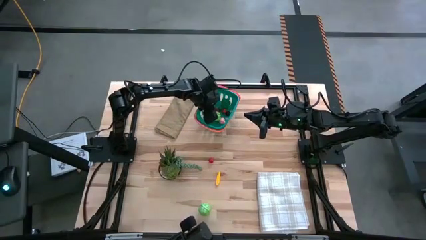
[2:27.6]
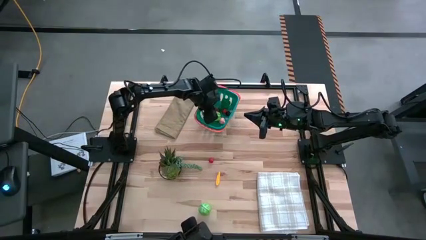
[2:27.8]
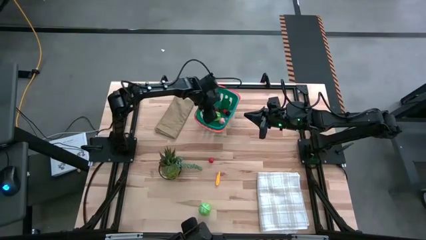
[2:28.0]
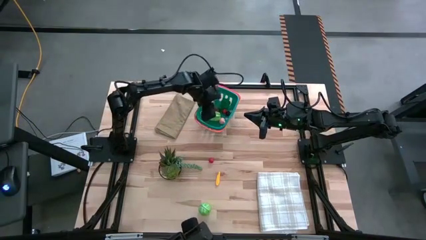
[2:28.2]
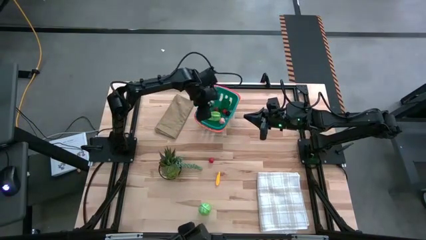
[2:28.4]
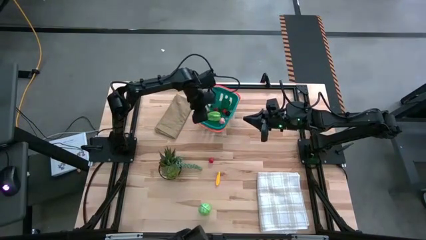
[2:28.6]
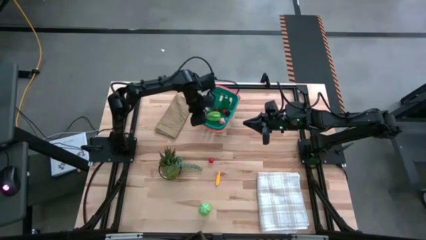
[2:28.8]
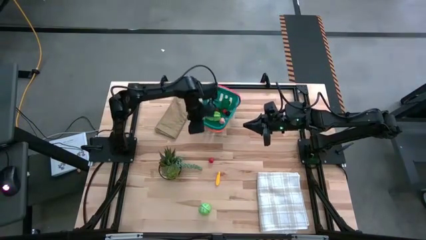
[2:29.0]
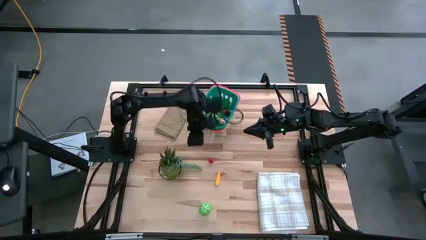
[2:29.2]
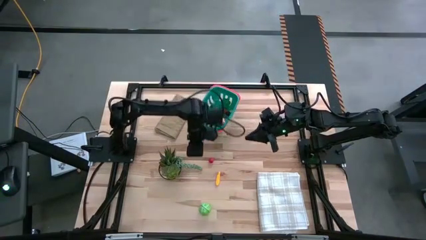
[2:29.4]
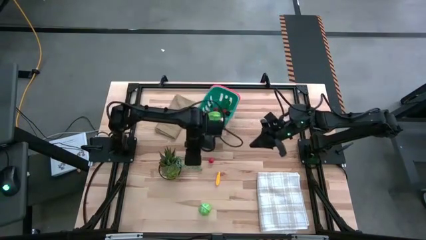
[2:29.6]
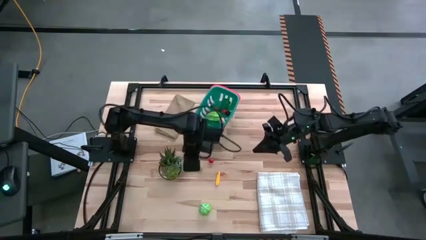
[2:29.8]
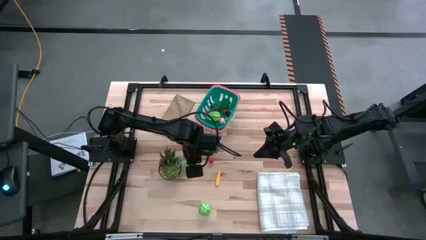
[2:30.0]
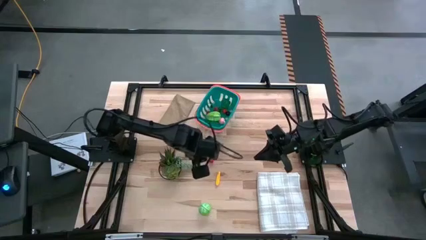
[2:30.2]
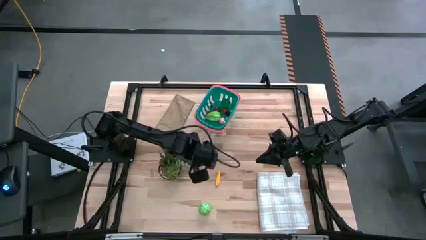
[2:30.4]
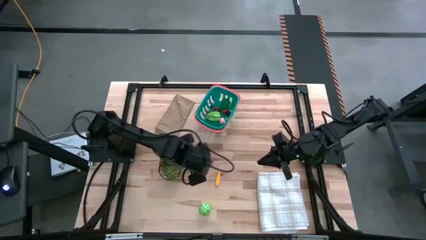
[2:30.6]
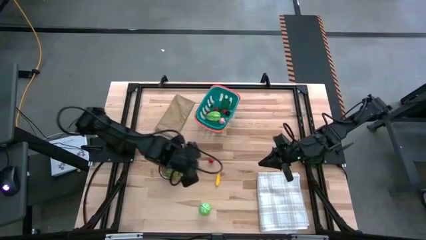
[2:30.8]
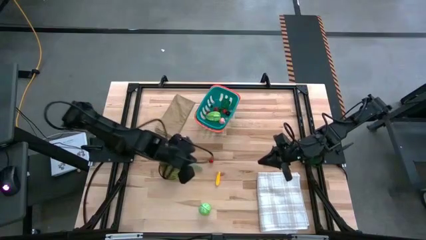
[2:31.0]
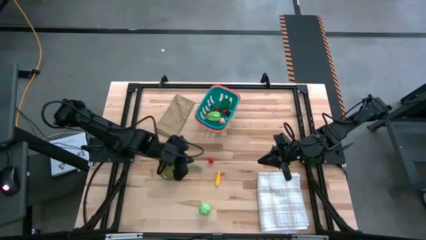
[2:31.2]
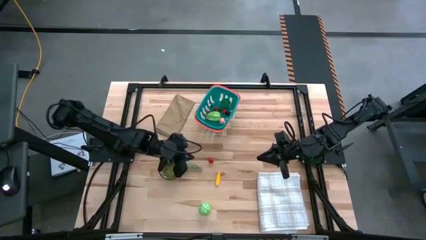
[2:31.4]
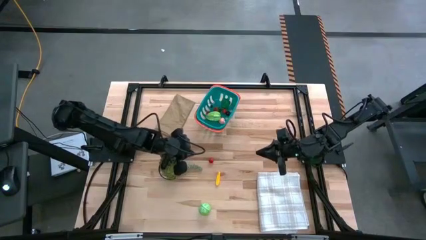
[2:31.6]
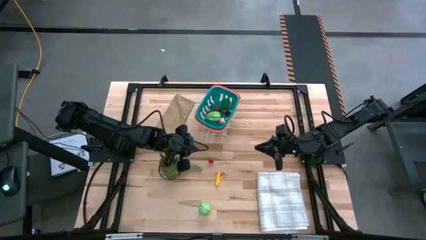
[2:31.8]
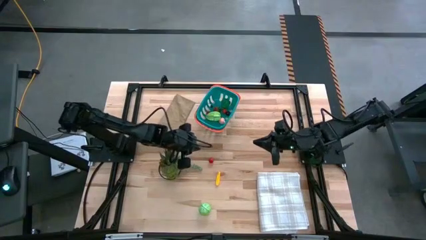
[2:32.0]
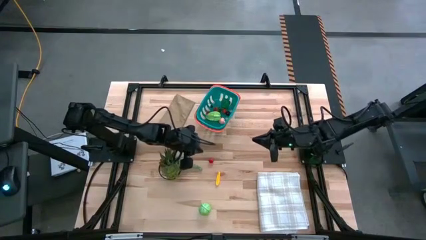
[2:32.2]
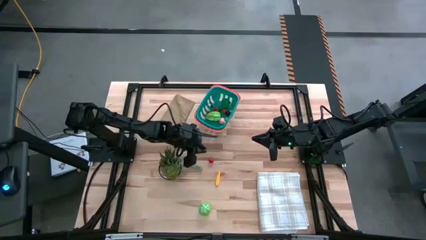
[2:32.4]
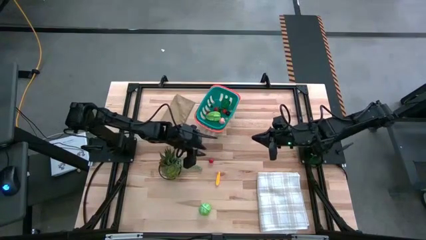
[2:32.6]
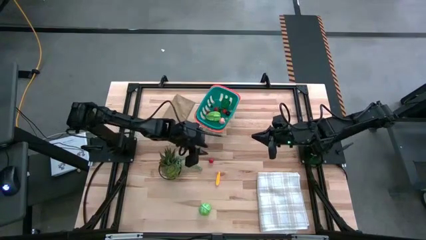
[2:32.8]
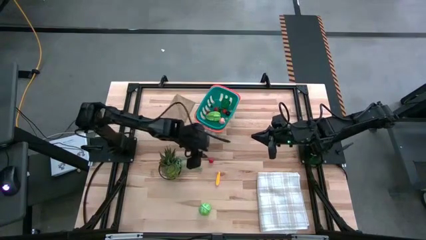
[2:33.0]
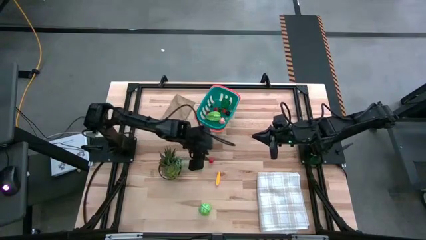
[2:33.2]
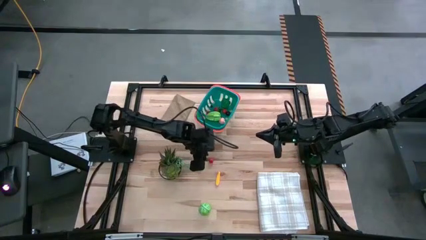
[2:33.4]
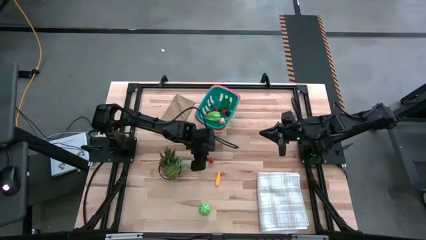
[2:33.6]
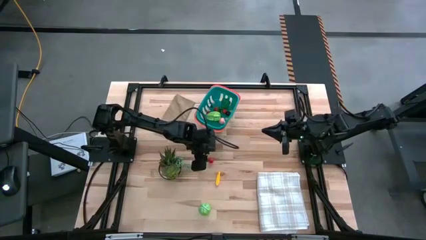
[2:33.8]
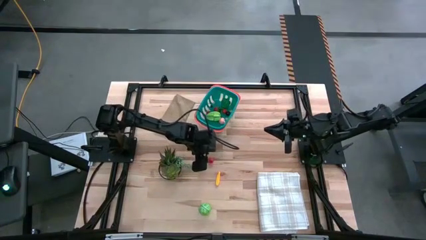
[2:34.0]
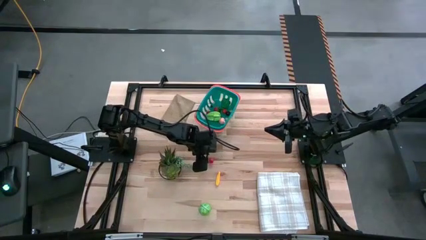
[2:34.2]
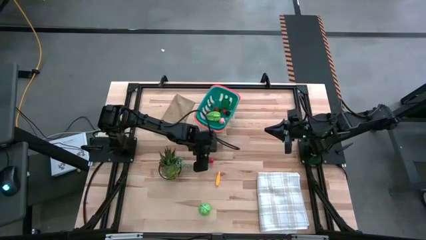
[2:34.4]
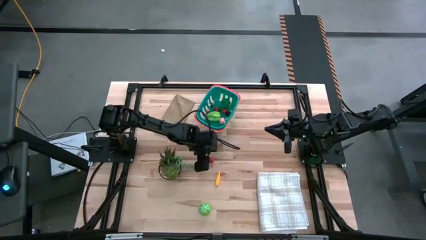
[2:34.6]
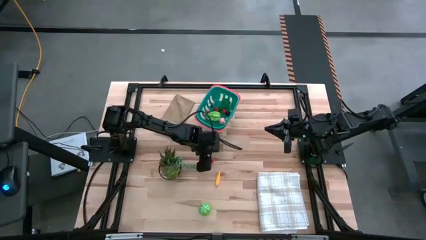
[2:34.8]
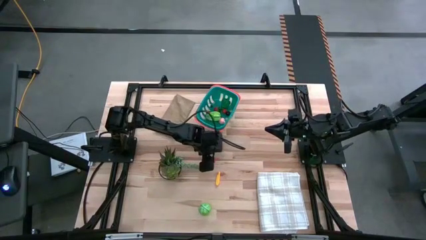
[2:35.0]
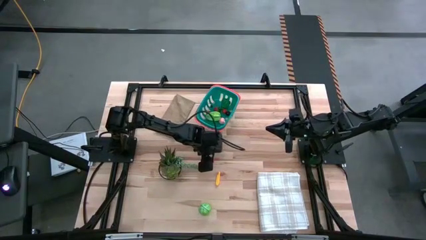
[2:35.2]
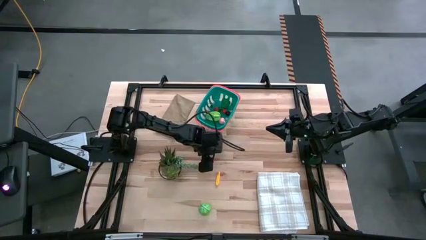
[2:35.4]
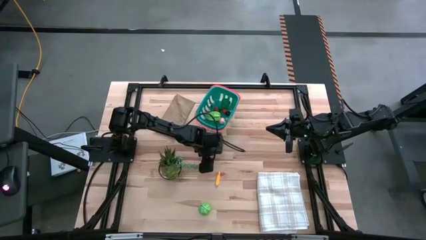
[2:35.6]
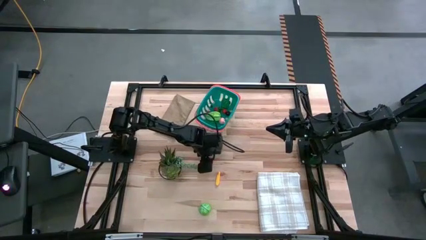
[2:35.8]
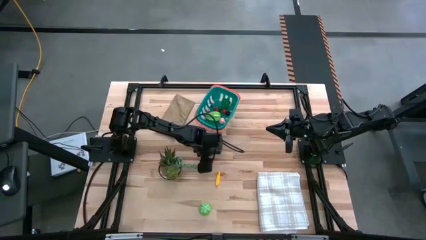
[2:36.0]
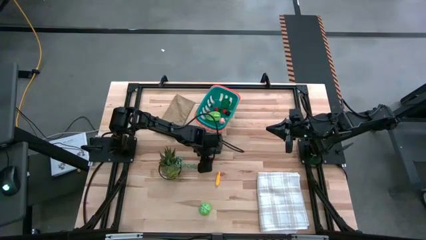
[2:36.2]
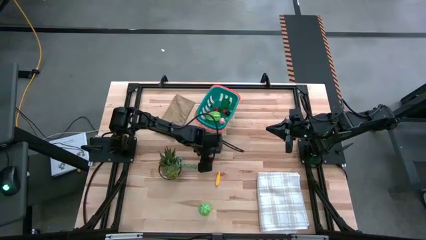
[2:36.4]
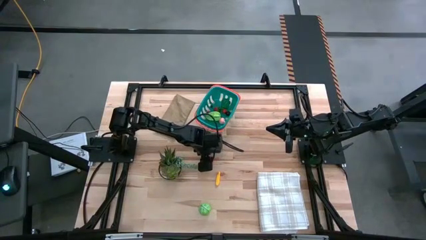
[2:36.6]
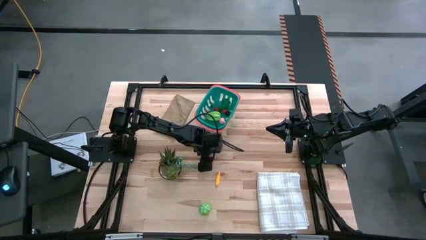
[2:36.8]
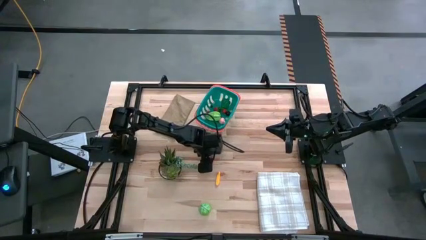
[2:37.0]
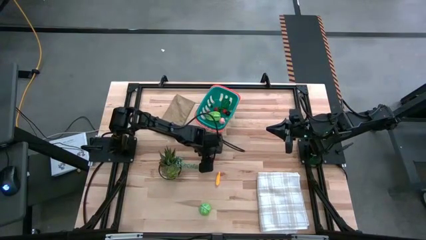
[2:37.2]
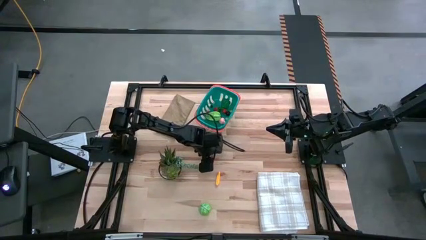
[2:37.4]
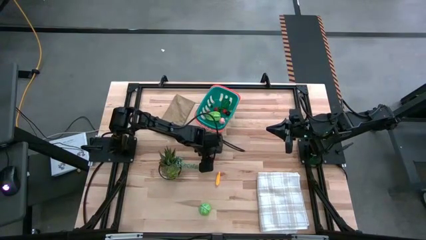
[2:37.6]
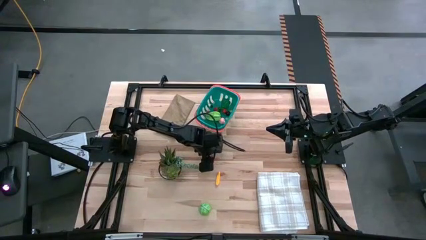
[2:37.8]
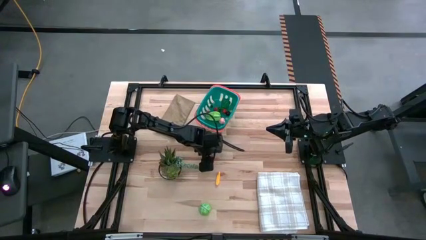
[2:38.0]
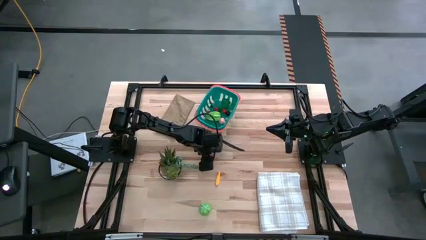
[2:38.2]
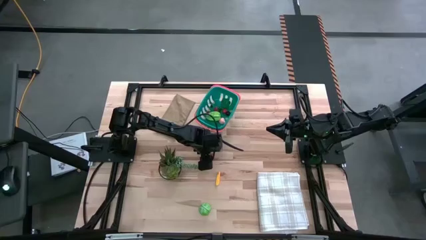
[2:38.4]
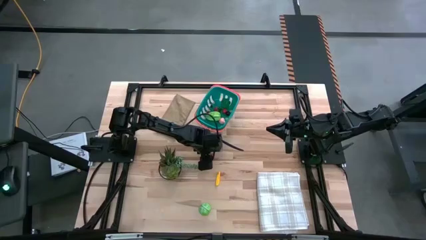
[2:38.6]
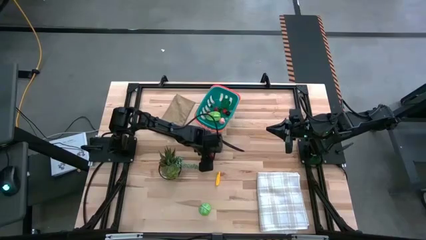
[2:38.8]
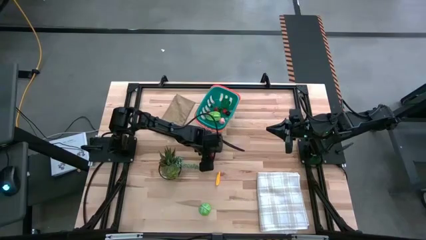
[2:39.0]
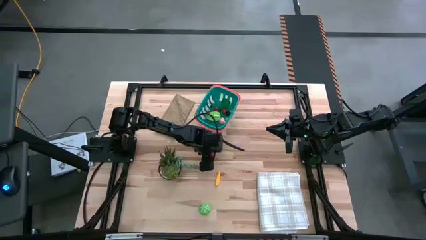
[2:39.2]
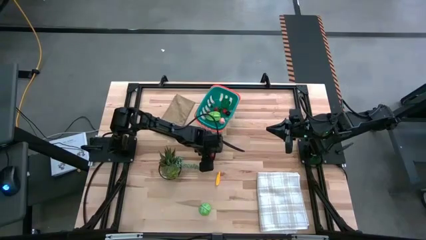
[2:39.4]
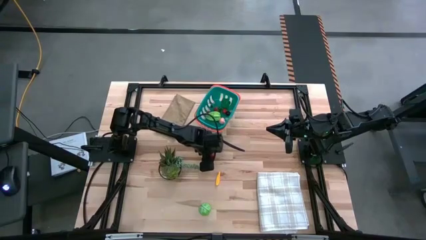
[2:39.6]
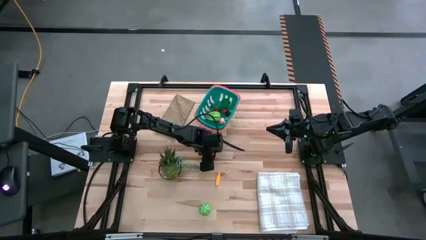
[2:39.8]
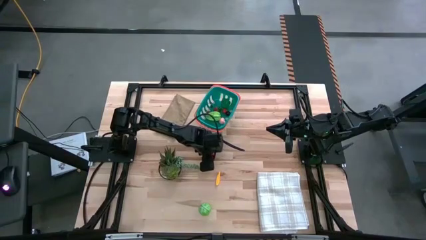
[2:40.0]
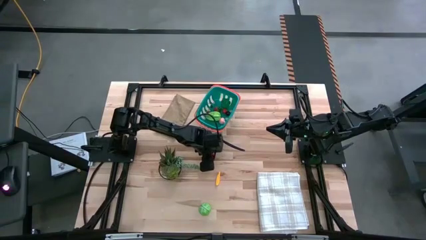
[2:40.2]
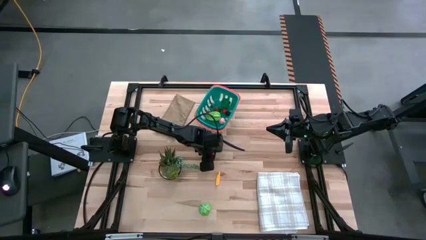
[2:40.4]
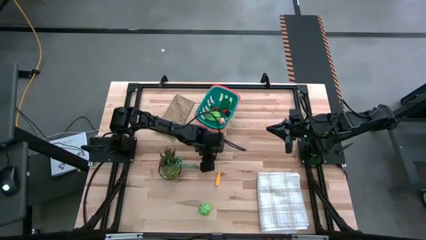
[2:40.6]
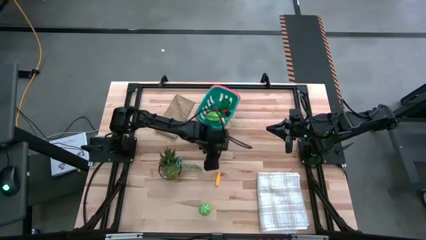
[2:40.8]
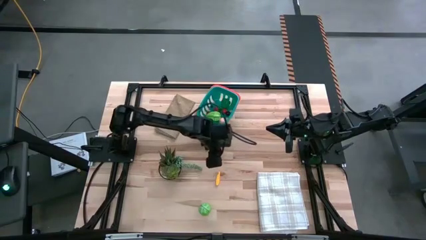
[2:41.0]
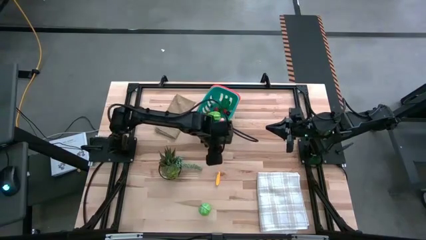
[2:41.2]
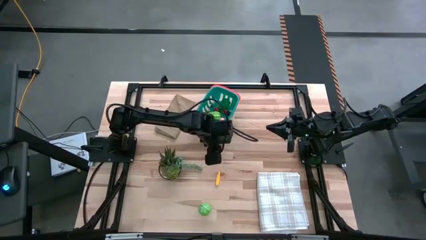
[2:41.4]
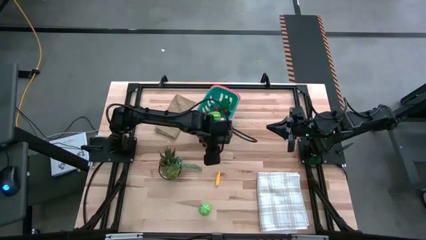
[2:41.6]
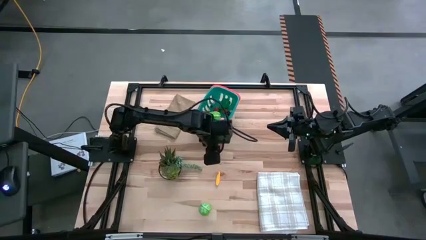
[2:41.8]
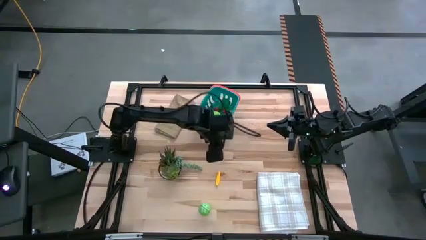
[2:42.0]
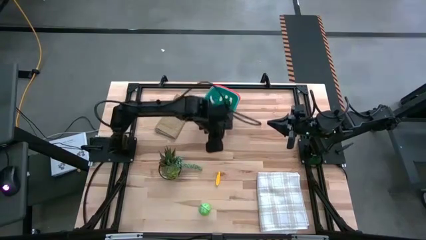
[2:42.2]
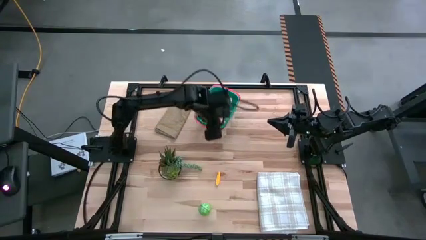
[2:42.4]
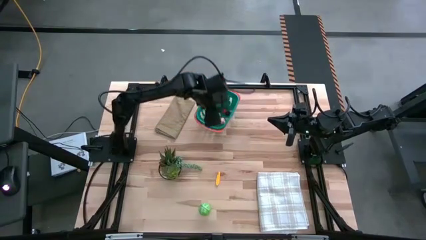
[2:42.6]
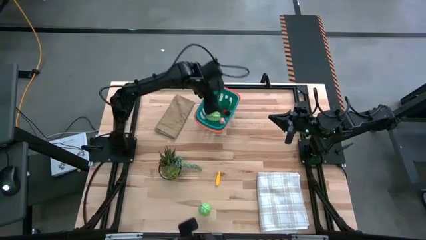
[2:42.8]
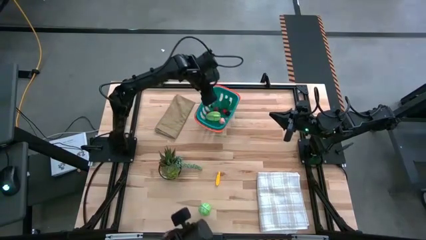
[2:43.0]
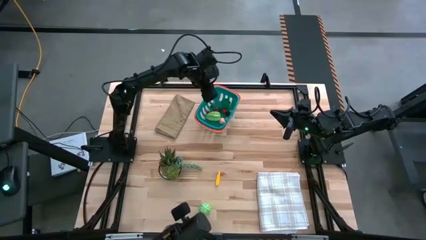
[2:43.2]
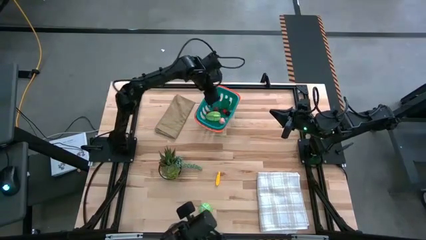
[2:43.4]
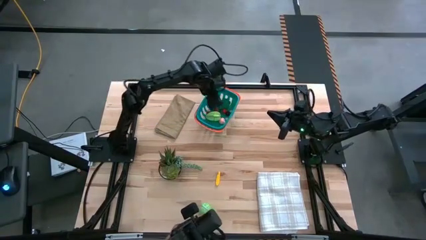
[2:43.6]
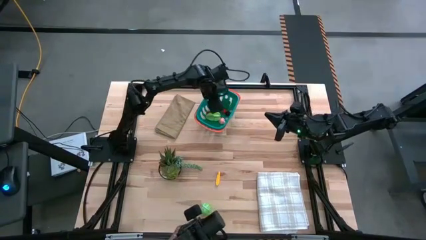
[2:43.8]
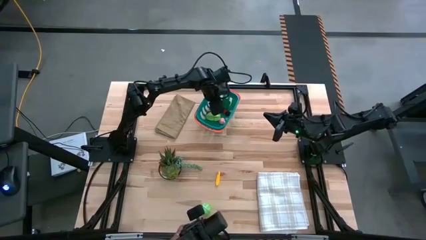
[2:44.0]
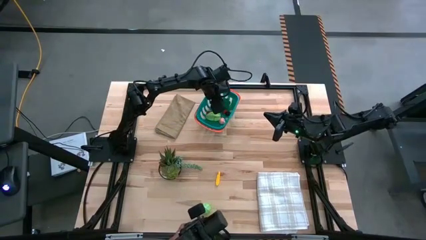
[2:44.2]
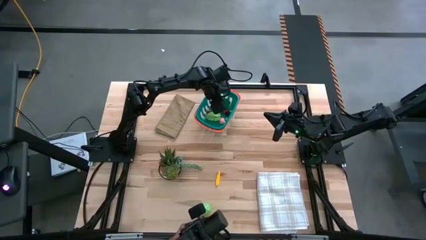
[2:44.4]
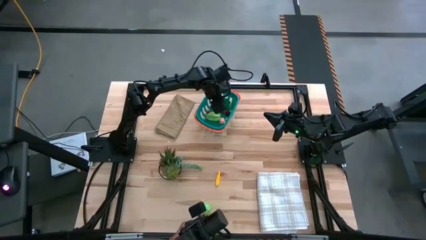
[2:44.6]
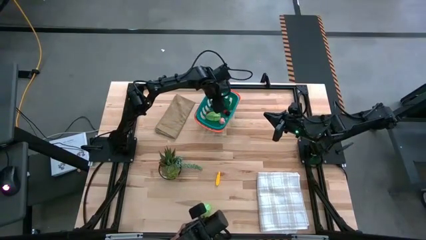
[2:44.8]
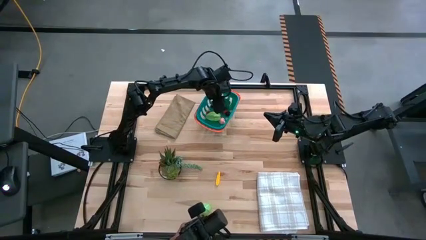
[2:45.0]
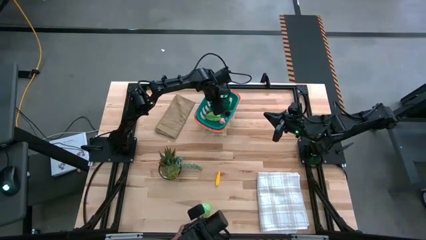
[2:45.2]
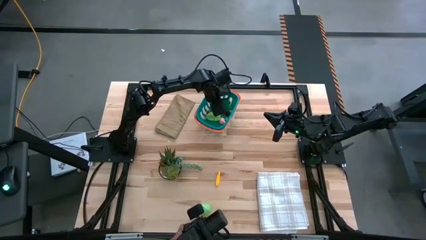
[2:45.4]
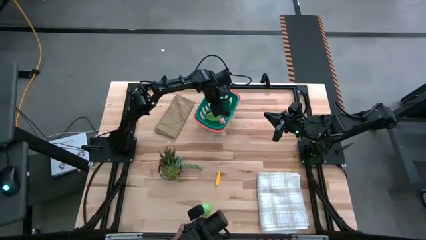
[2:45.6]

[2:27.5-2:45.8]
Task: Pick and placing Produce into tupperware
Put the red raspberry in the green basket
